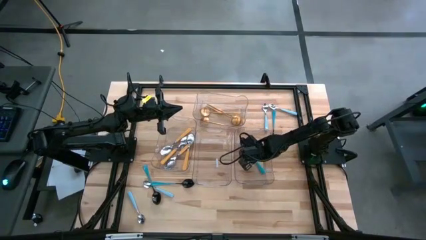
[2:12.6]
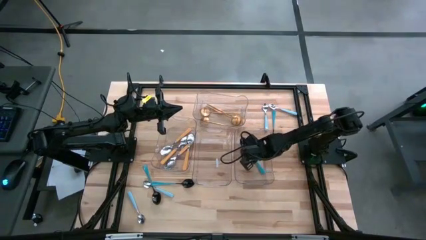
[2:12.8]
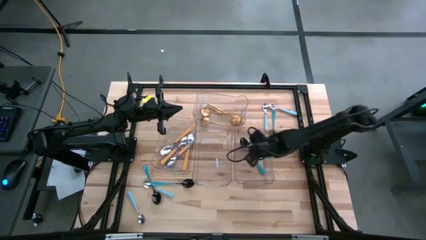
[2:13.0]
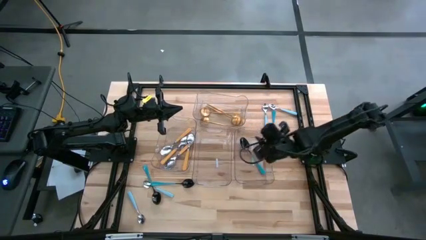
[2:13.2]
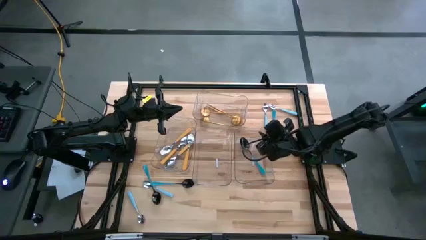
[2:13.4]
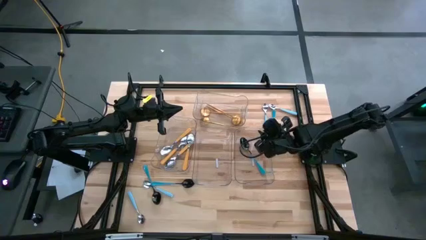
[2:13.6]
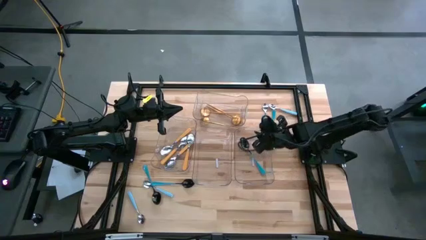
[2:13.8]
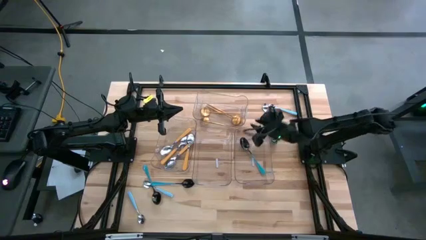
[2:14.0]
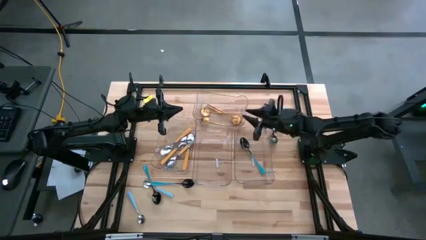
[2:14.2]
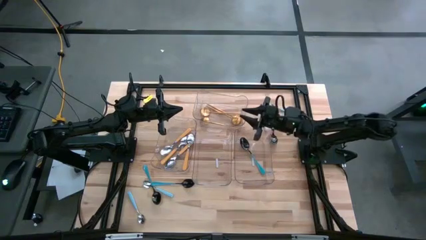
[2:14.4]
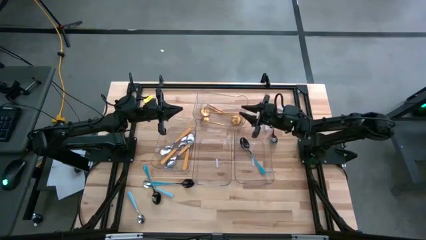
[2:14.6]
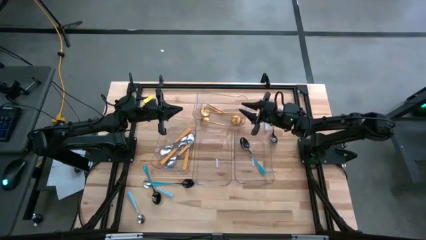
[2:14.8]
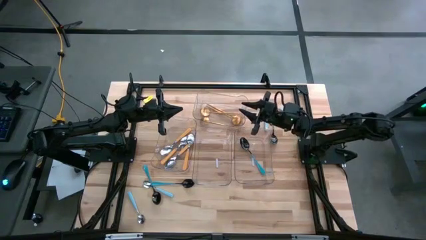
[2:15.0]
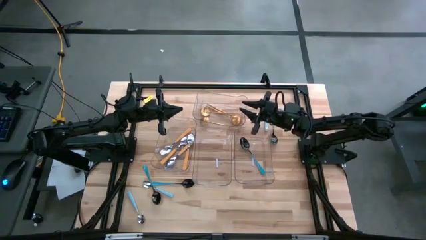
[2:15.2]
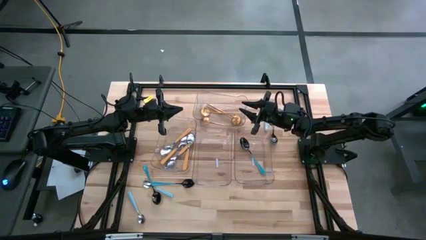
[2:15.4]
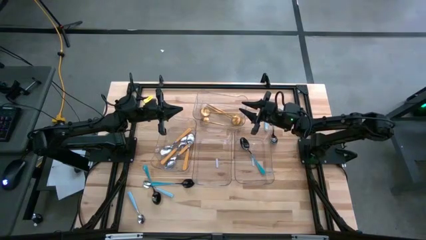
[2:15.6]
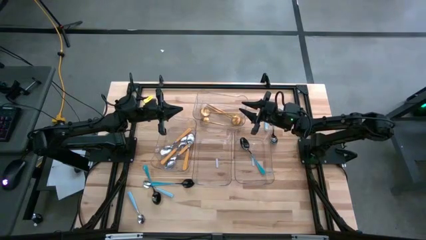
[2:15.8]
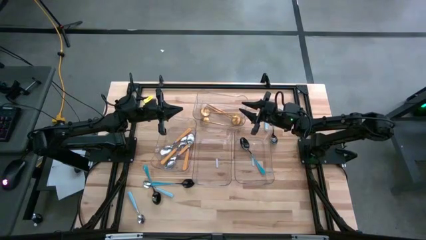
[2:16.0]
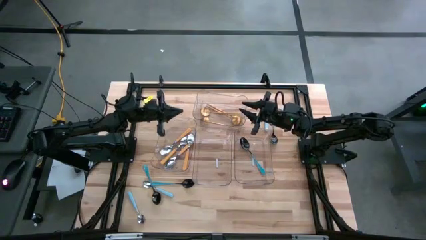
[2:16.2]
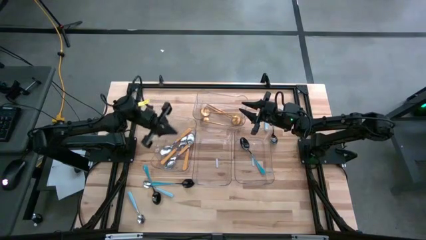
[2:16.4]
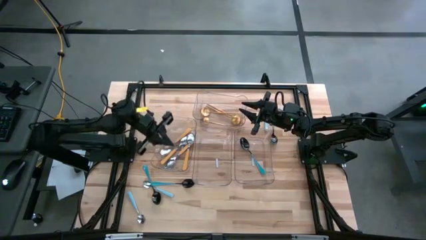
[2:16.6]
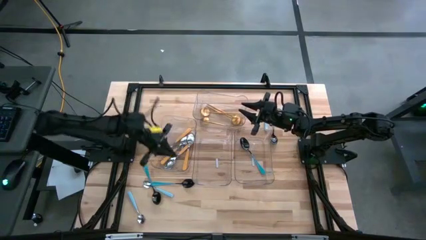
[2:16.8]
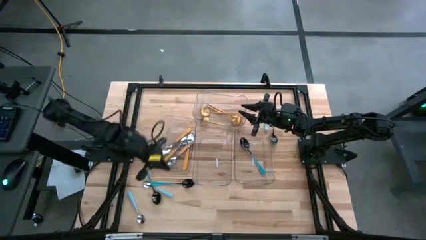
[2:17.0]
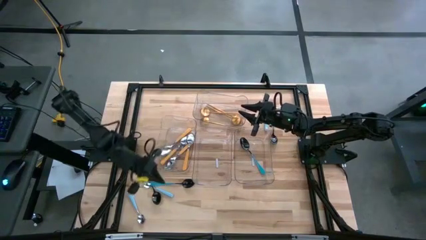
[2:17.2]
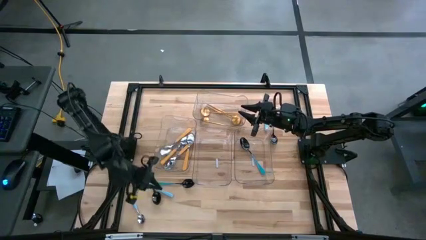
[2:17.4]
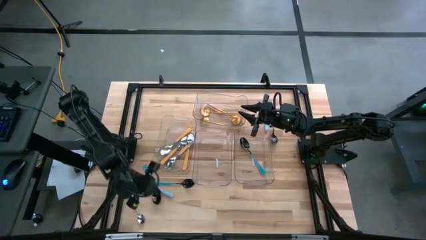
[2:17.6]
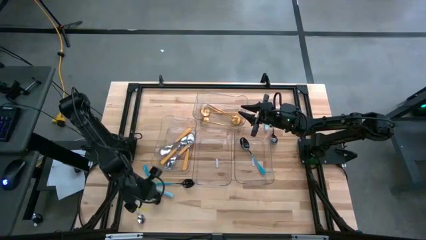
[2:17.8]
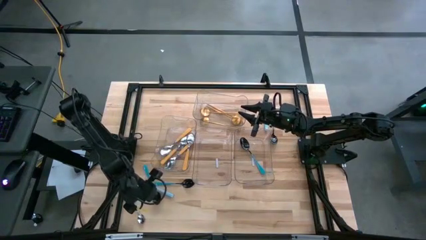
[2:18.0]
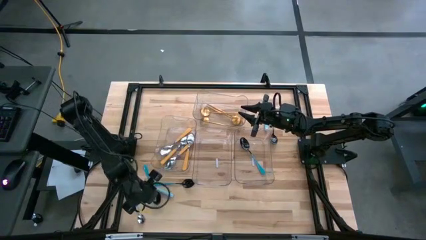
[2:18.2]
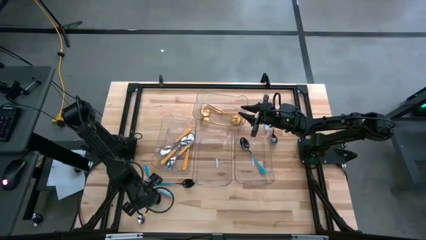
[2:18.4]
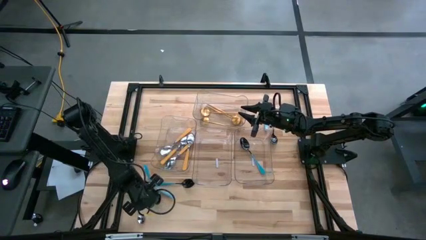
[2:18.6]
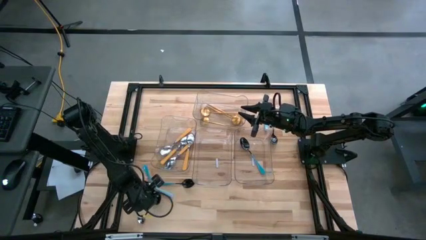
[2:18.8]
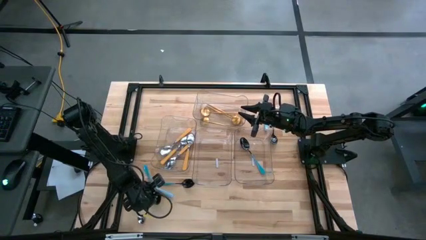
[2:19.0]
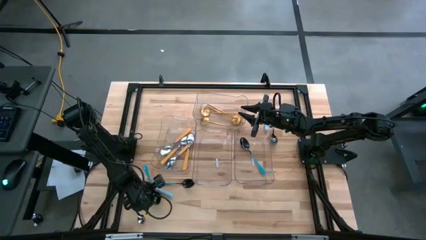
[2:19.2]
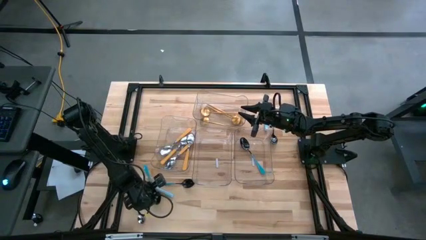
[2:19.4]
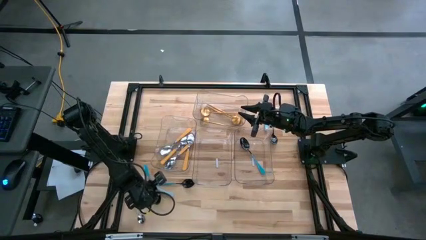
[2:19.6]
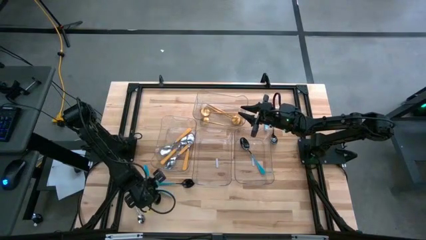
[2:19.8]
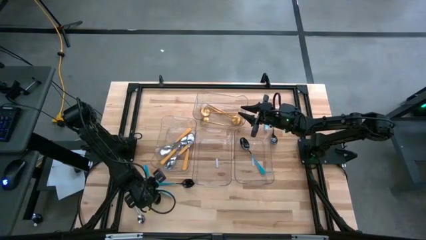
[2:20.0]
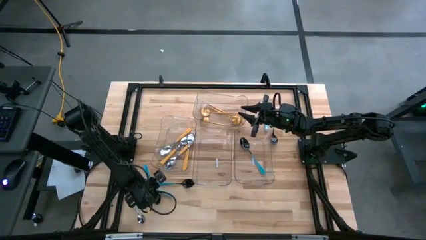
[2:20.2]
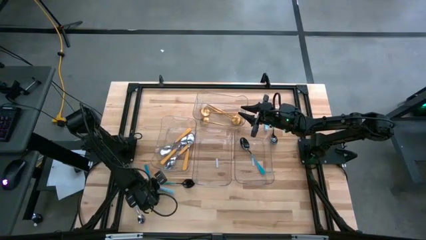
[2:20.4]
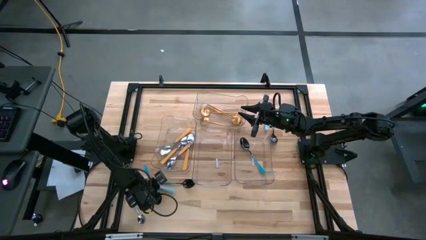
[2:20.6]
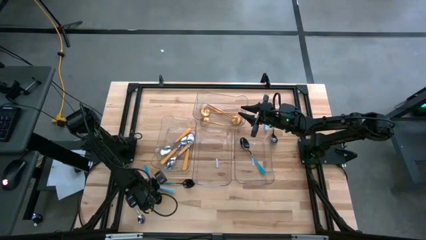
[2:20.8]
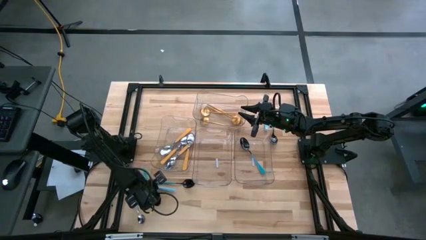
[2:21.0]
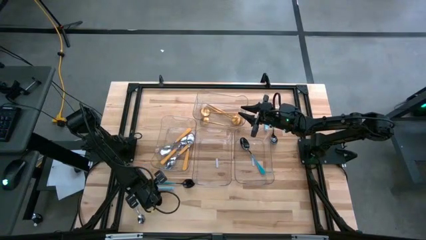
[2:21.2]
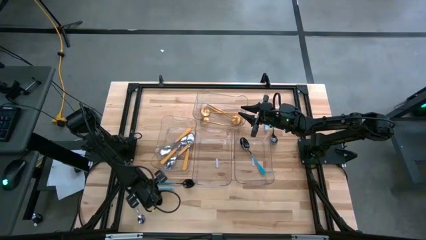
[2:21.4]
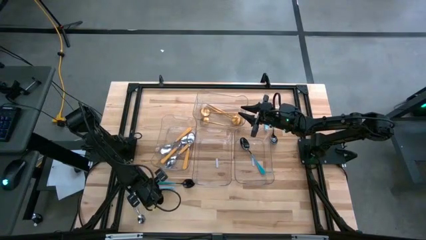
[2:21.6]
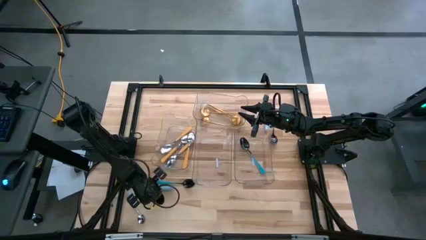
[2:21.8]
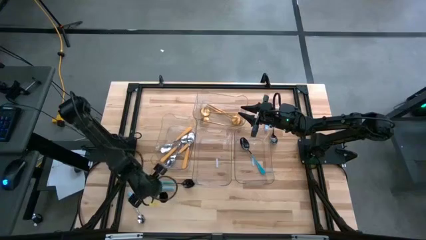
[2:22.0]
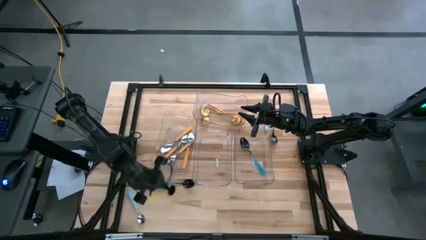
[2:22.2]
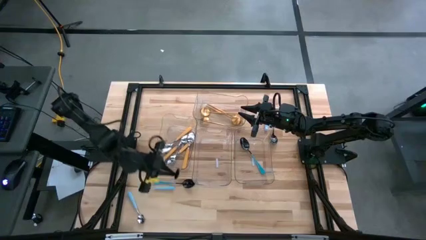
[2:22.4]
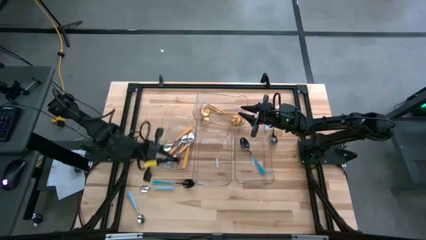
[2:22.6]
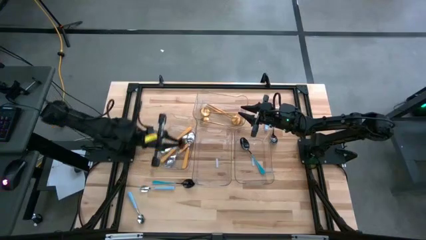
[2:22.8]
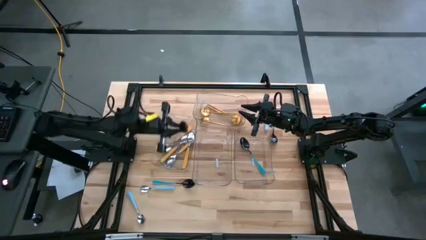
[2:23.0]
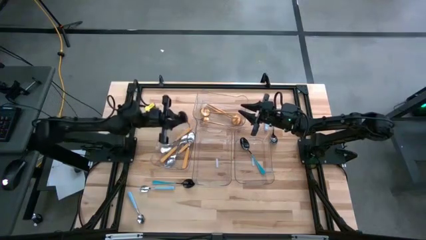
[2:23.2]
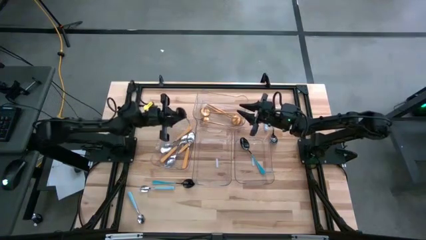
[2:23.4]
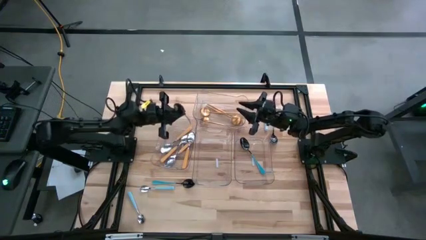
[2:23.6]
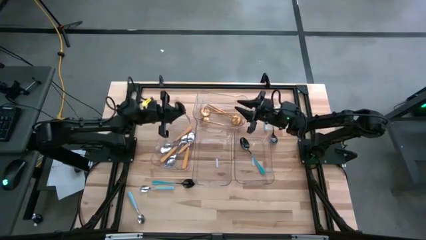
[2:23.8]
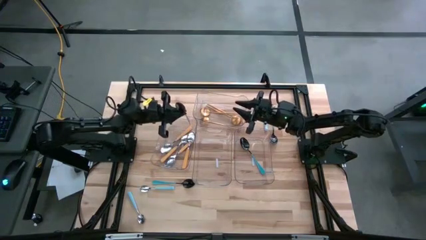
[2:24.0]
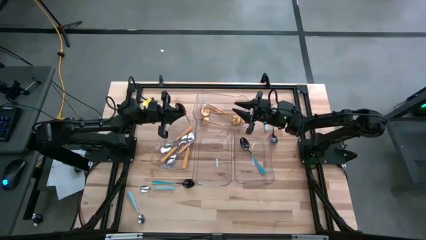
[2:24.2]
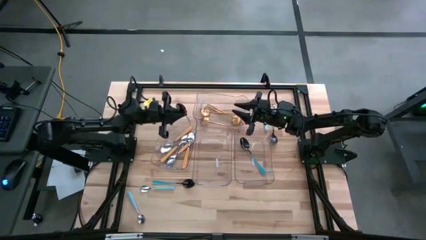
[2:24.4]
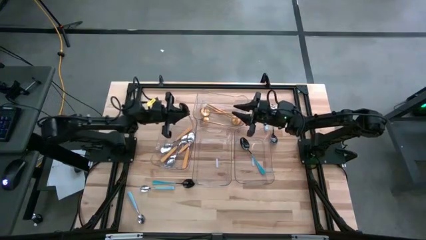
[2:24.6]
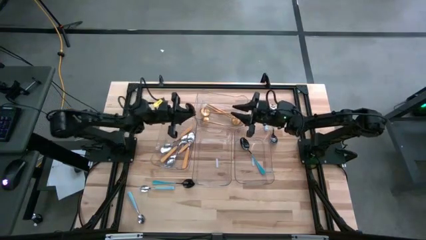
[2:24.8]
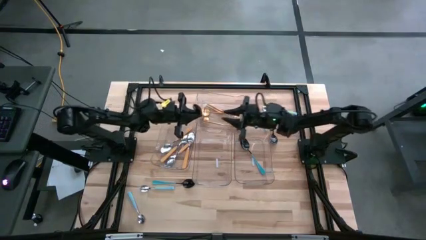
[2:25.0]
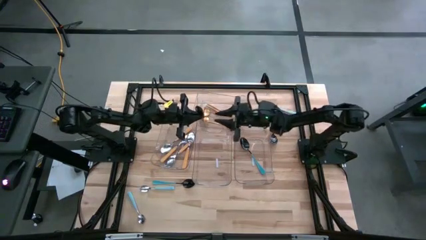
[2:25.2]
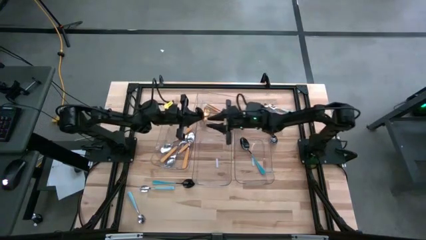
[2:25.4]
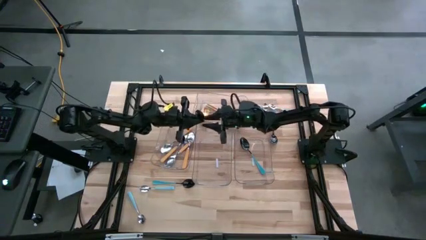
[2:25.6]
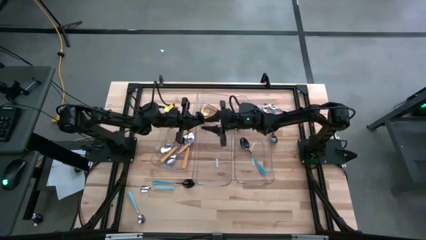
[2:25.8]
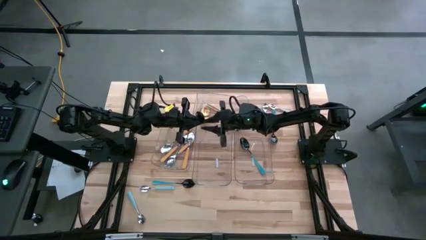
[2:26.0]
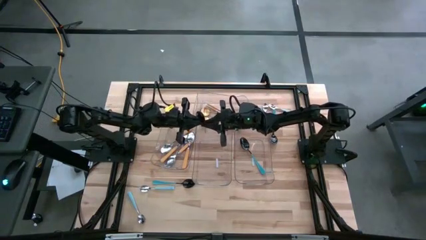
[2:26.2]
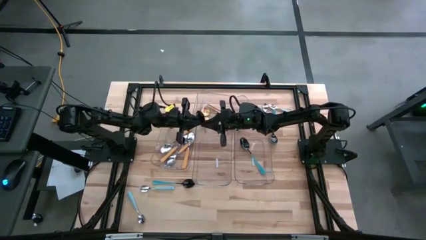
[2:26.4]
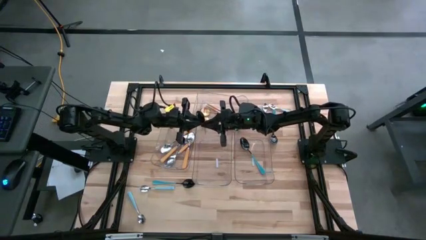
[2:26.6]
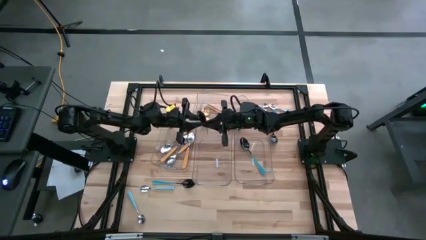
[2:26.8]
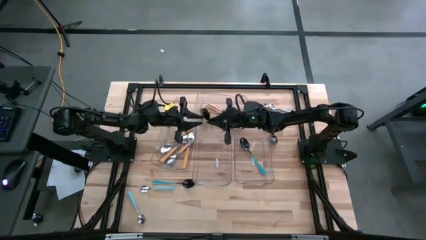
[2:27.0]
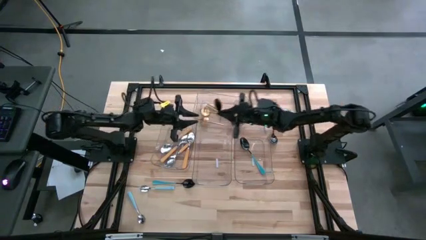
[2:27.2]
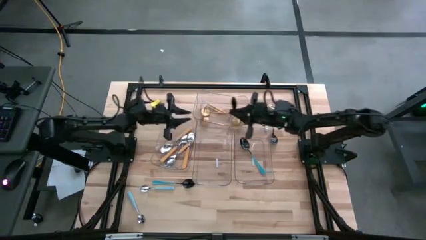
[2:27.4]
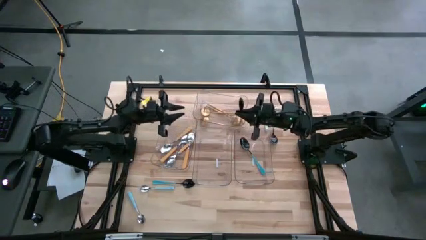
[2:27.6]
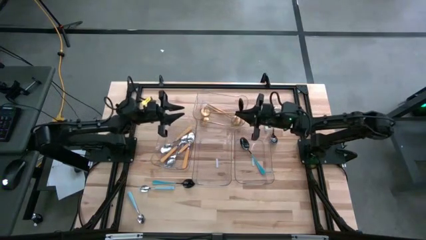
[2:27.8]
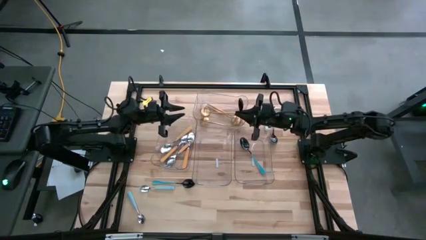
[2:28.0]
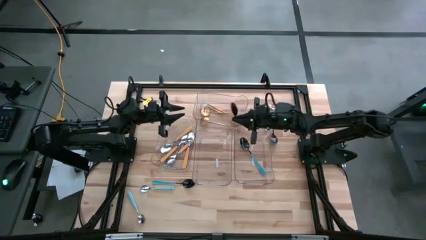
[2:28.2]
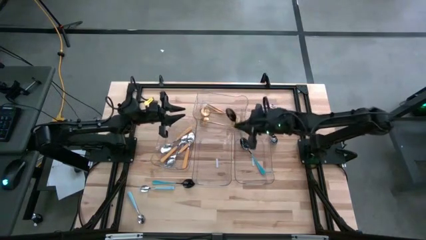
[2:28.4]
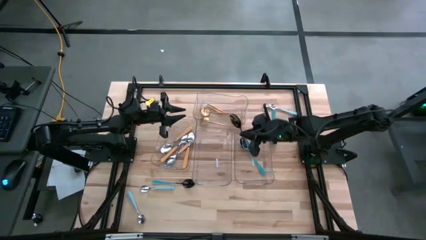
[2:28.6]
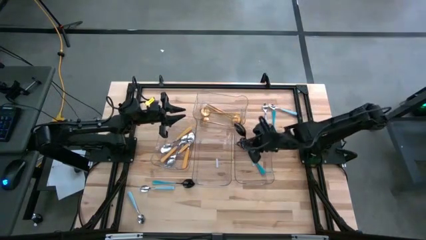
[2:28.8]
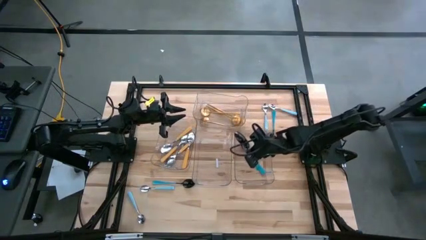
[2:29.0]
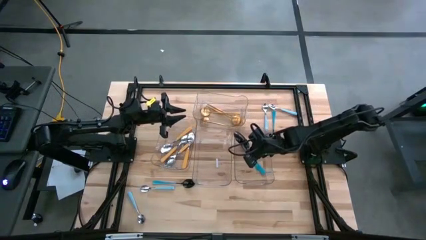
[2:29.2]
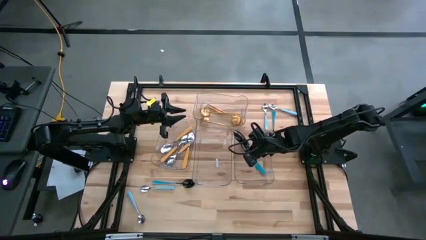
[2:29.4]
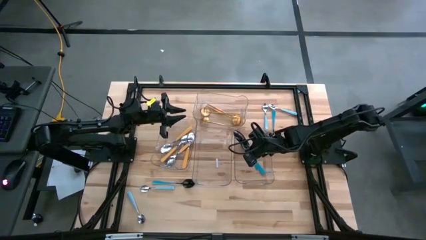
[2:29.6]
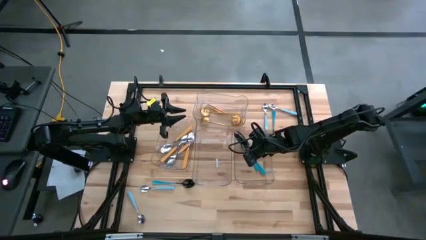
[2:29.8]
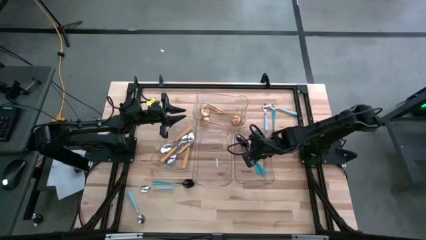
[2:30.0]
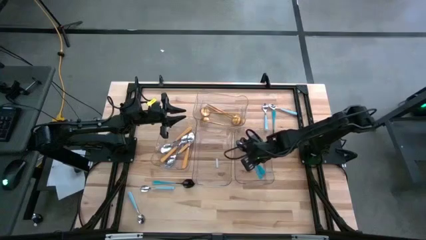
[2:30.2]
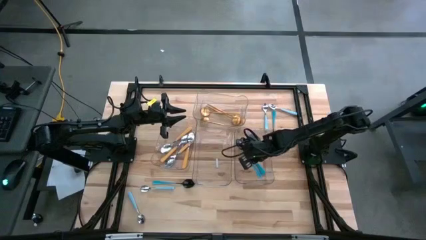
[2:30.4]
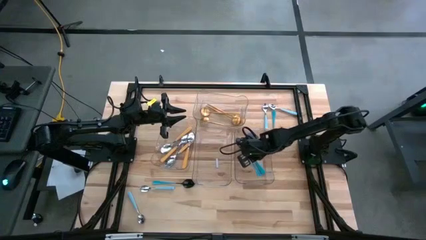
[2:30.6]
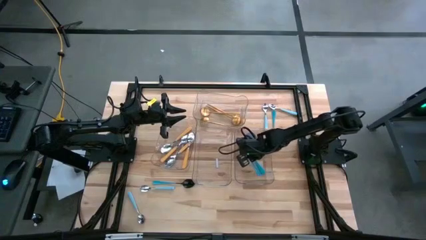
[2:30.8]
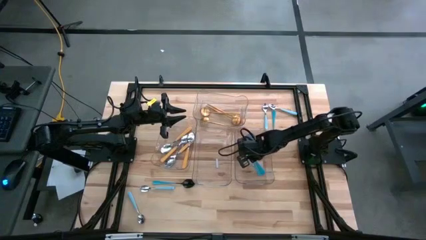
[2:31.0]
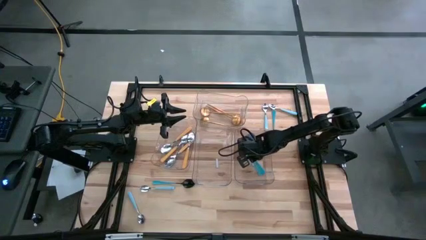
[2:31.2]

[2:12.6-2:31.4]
Task: Sort silverware by color (type)
Put the blue spoon into the right transparent bin
